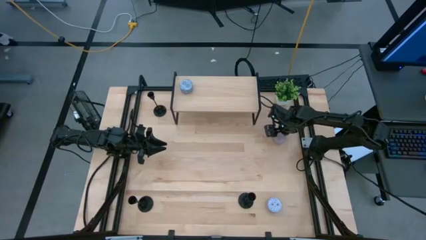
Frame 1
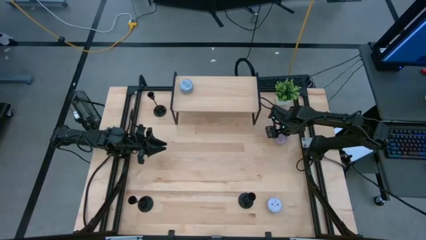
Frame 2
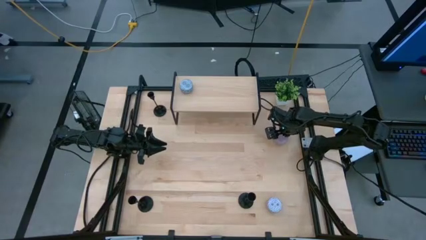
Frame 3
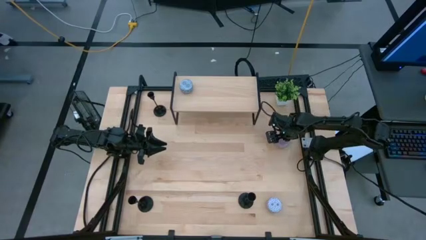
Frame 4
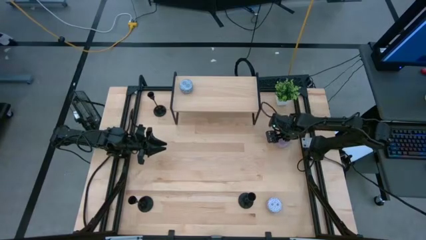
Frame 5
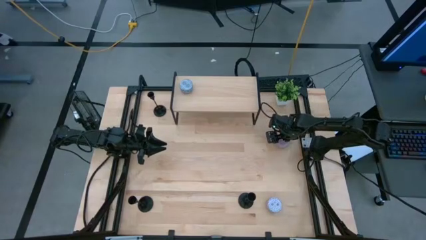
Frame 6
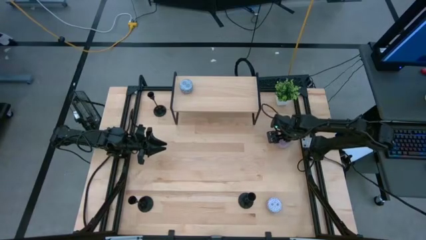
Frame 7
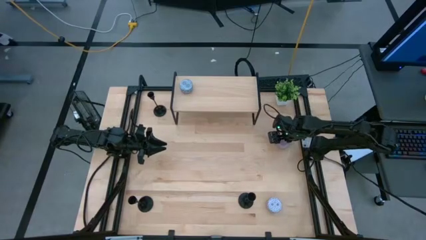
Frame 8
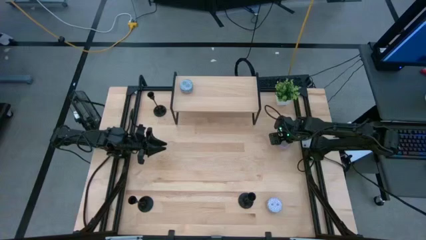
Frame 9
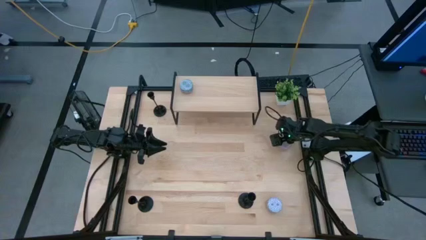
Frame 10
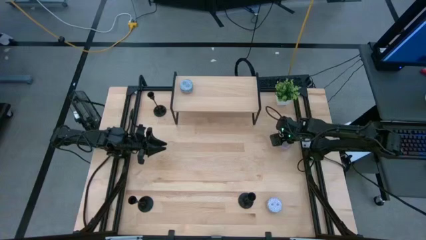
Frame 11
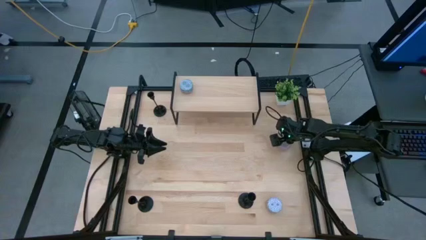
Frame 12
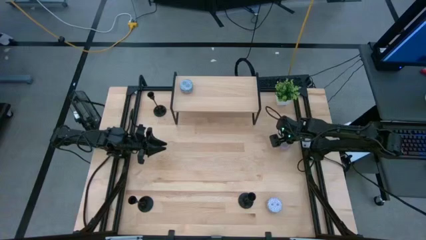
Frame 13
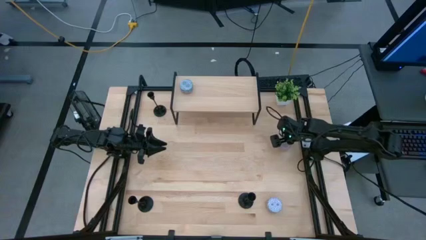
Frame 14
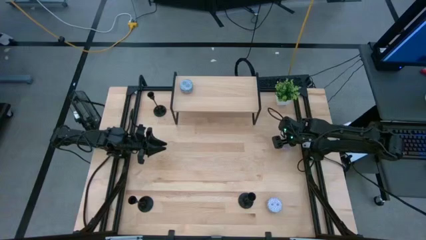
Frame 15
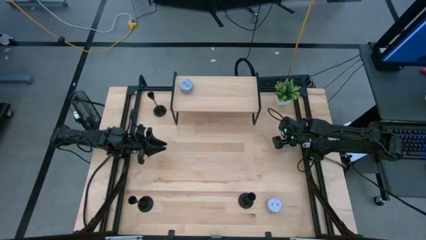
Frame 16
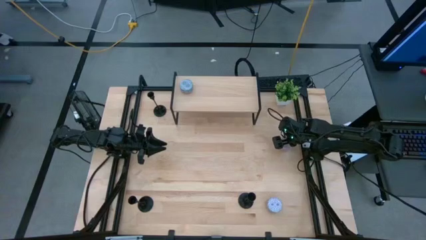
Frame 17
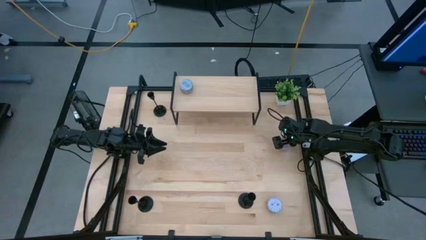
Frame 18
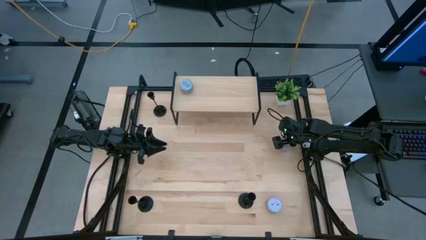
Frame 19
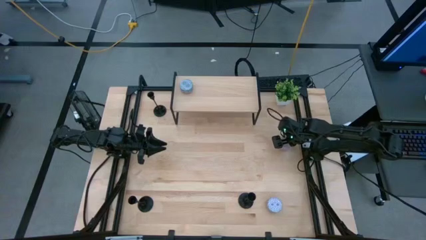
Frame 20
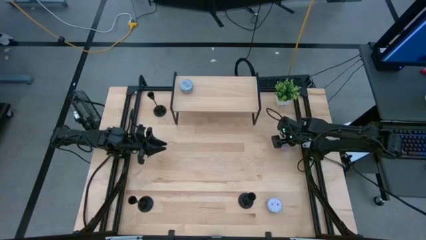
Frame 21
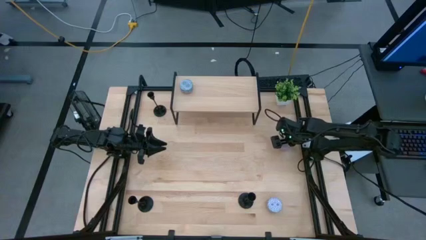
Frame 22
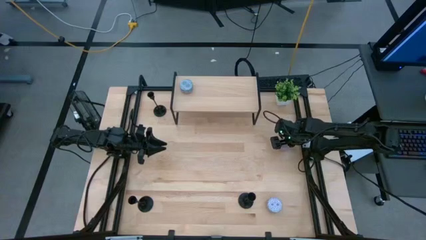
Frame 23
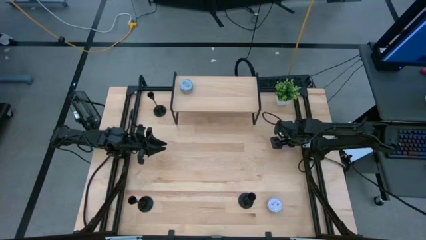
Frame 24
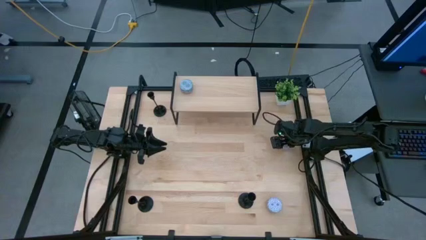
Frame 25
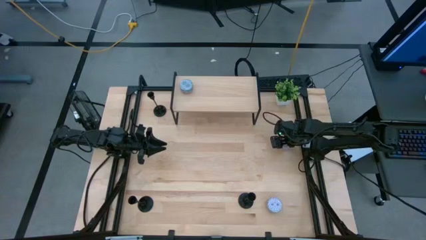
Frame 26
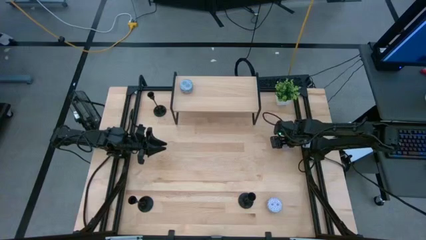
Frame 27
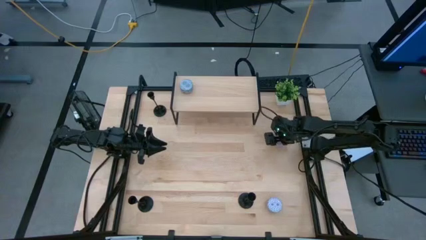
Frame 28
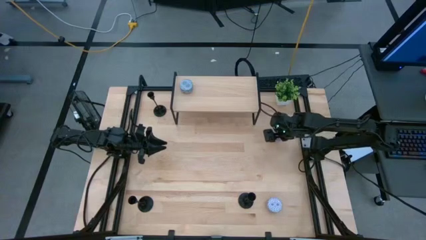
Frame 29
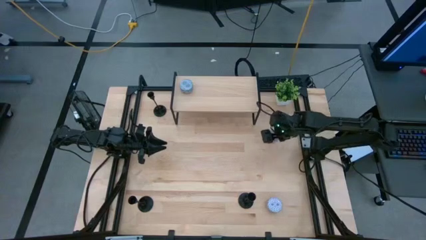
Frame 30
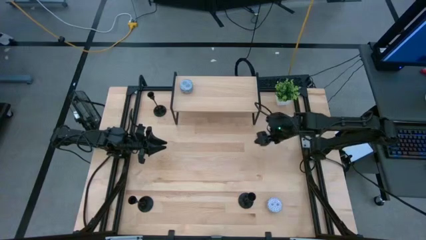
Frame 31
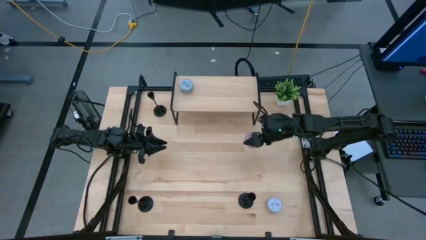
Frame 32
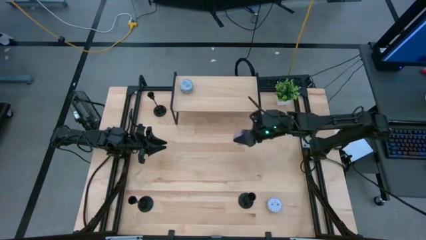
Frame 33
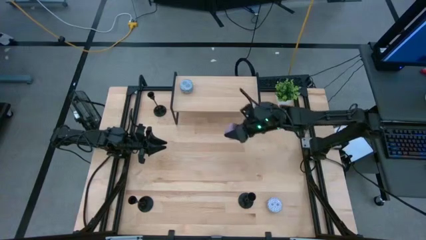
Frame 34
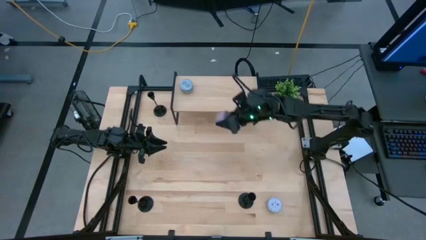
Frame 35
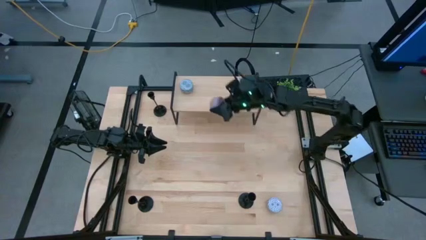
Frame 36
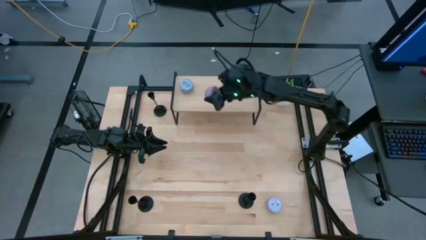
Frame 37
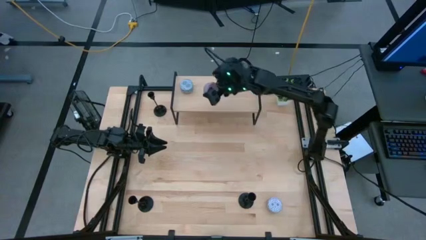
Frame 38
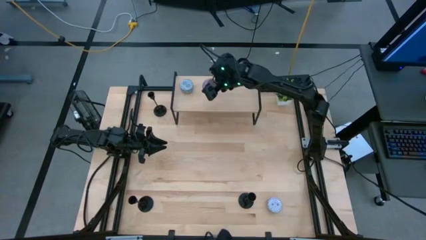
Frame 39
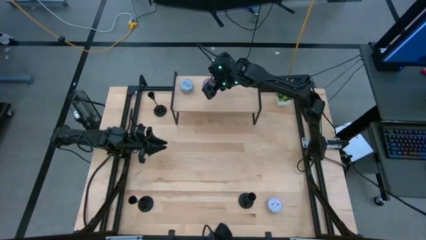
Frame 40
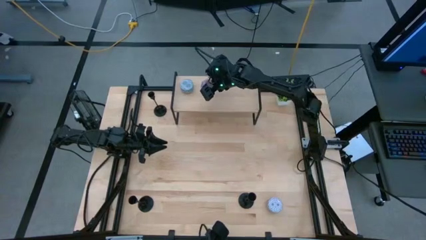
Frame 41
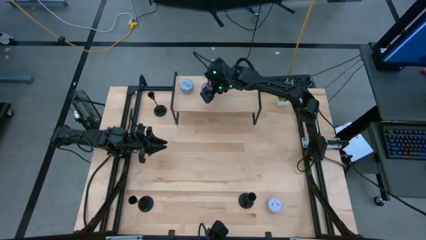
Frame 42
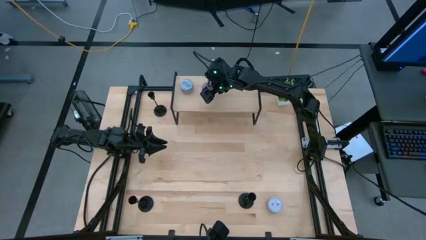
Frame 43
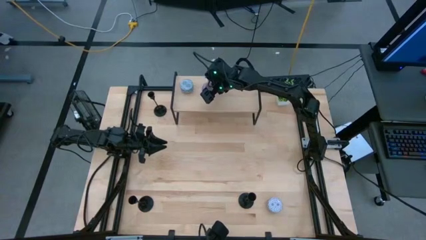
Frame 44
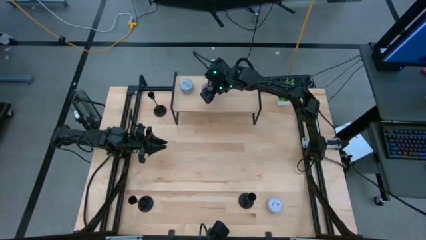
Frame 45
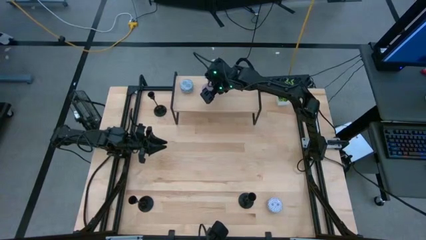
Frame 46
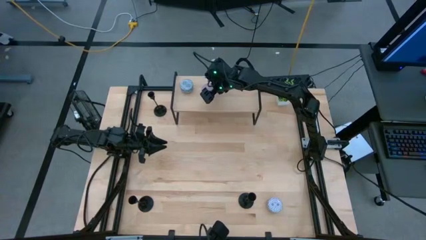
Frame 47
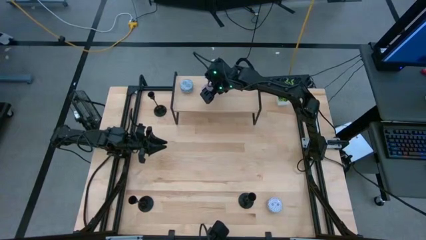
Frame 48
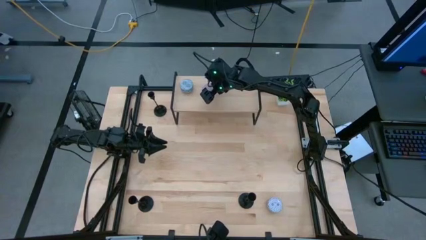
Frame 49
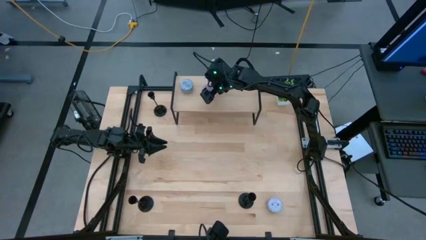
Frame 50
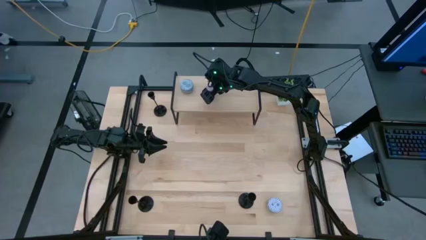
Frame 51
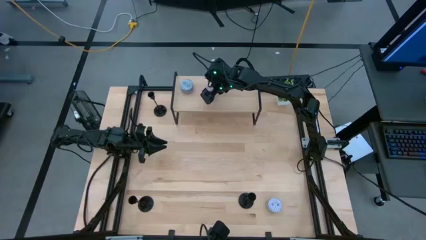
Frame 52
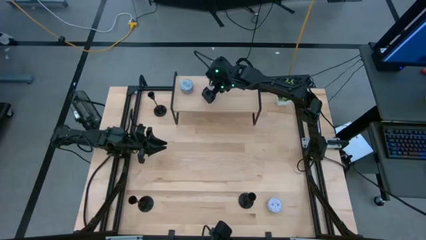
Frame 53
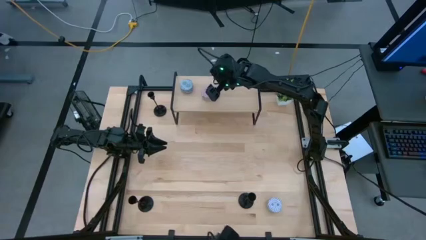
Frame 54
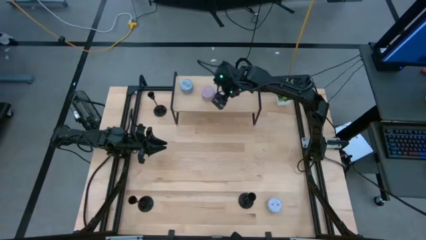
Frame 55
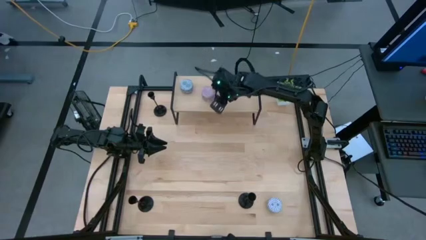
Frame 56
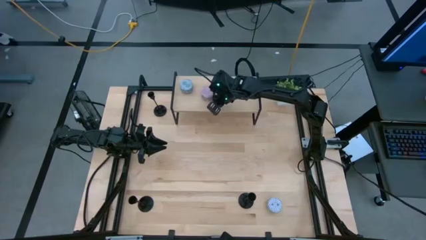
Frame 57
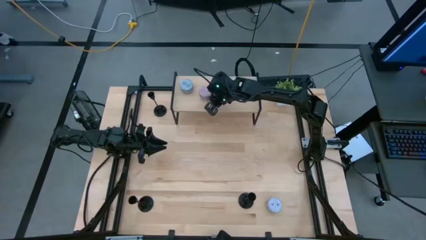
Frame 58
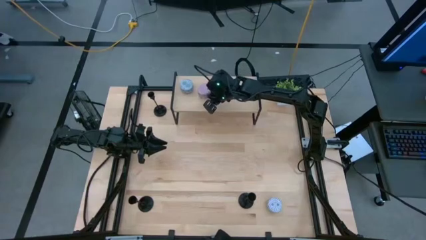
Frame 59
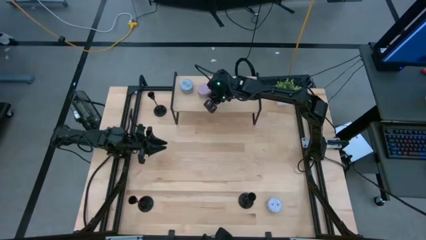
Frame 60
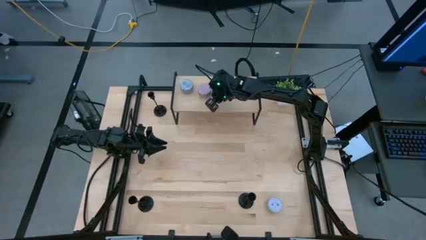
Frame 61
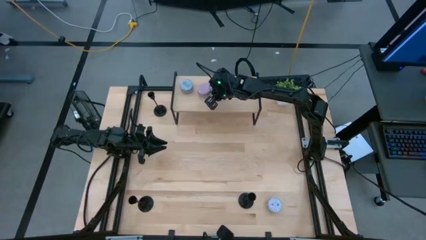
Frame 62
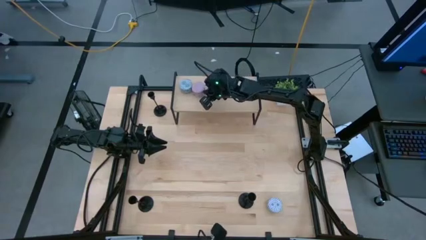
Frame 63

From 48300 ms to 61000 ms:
Task: Pick & Place candle stick holders
Put the purple patterned scented candle on the shelf
